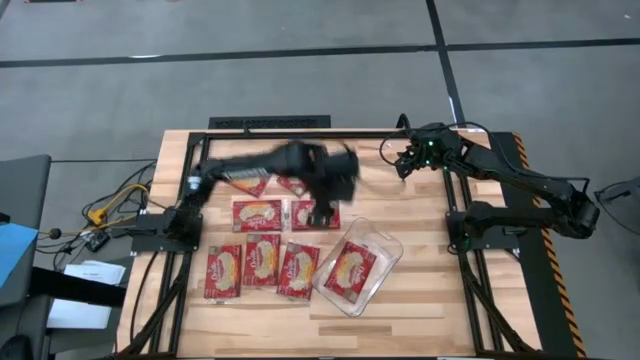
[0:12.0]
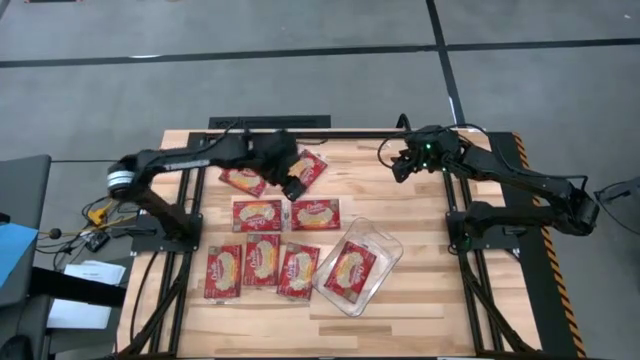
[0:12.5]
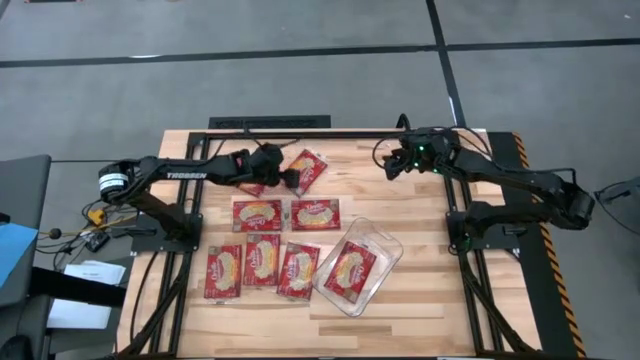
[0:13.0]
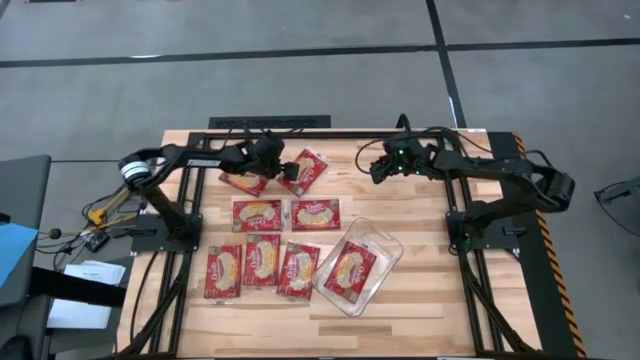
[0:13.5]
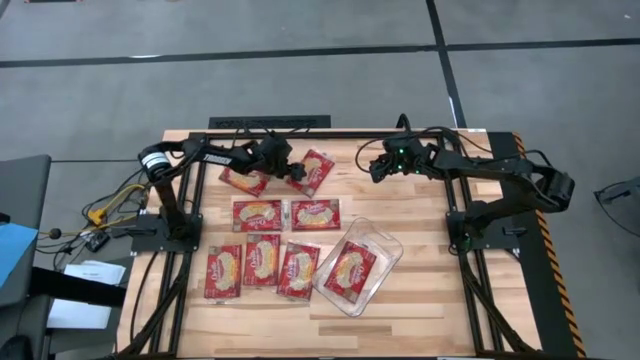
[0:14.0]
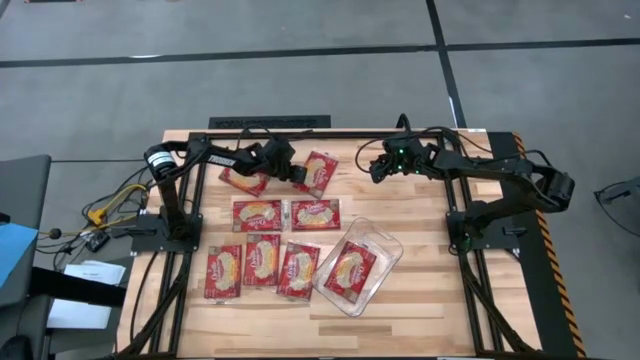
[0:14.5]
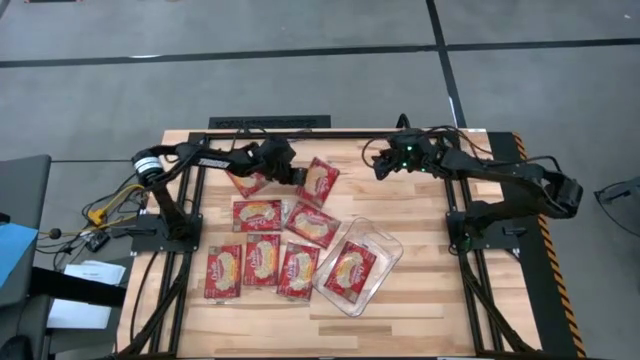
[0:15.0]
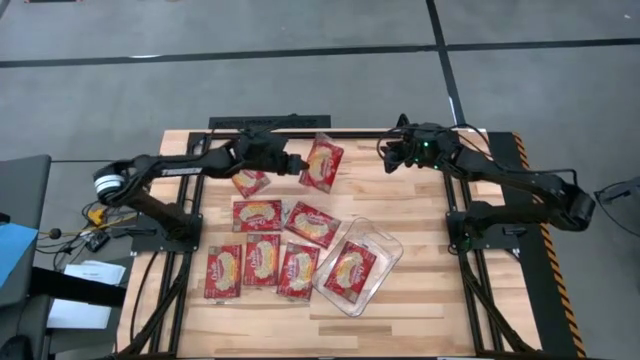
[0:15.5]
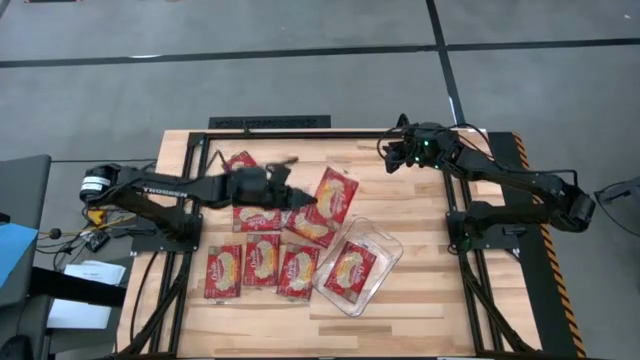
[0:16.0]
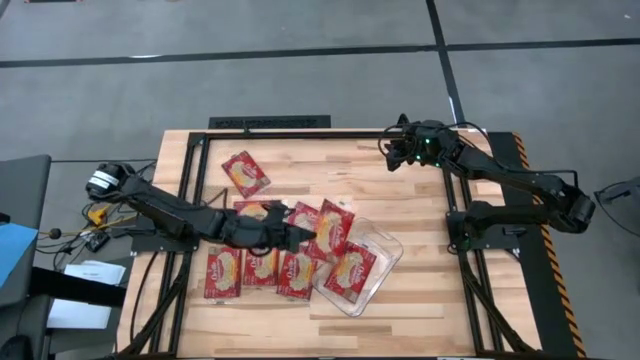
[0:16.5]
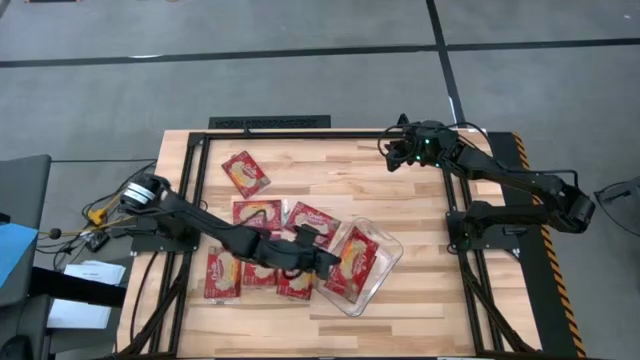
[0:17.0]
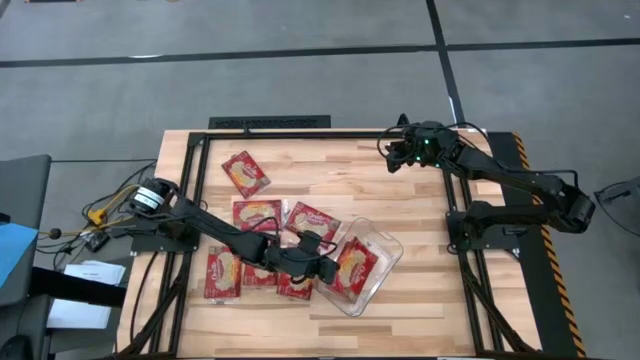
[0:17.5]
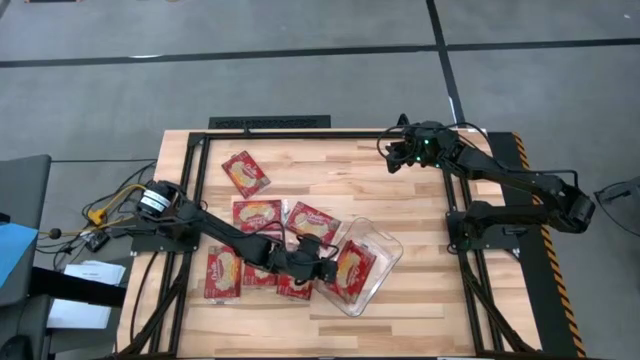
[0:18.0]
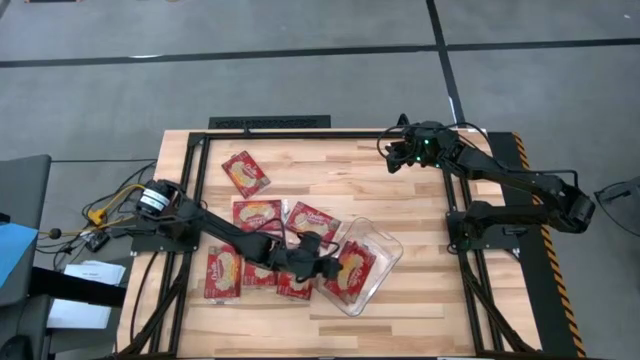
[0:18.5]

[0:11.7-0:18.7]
Task: Sort popcorn bags into baskets
Put the red popcorn packet into the transparent bin

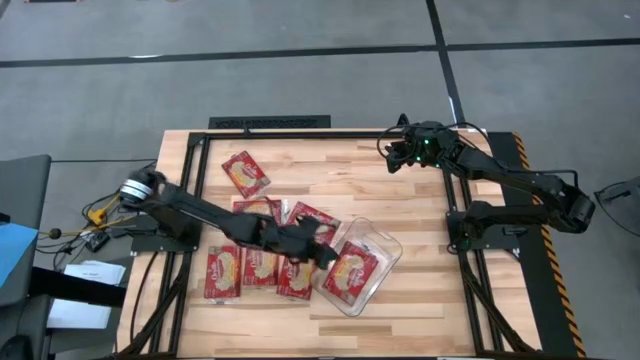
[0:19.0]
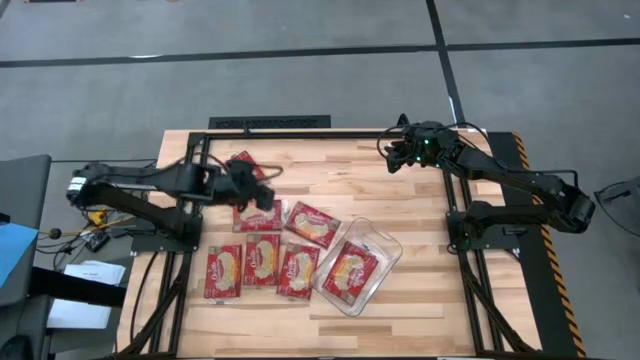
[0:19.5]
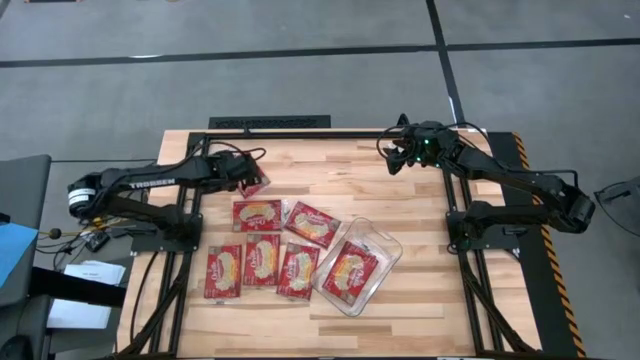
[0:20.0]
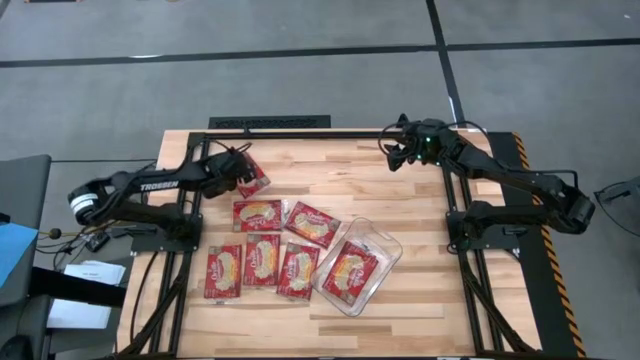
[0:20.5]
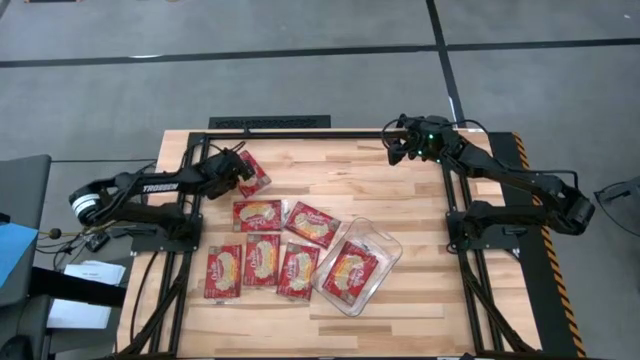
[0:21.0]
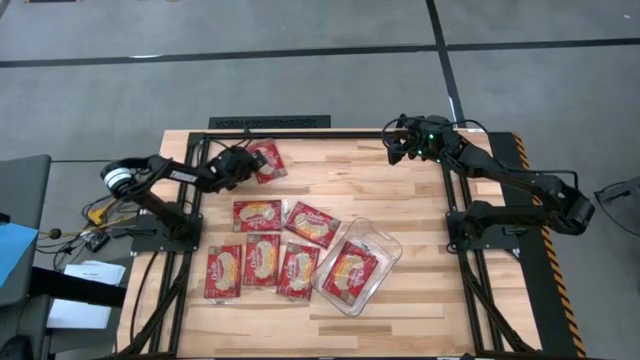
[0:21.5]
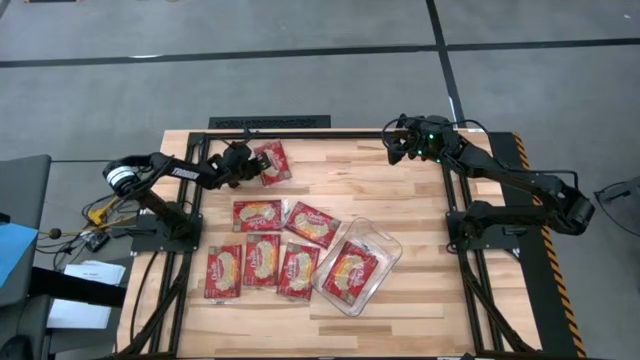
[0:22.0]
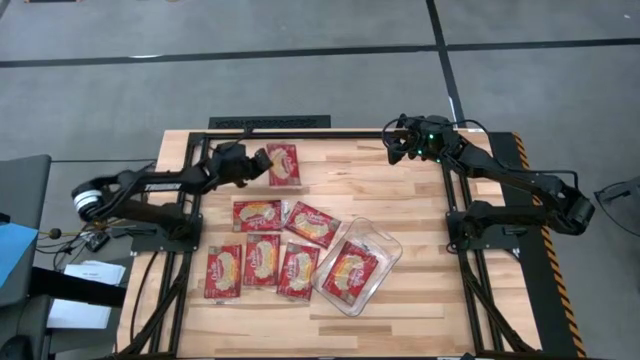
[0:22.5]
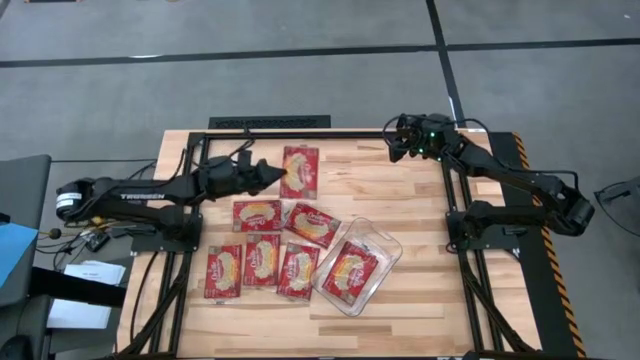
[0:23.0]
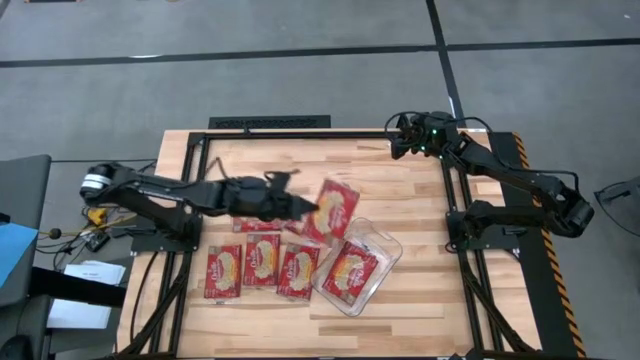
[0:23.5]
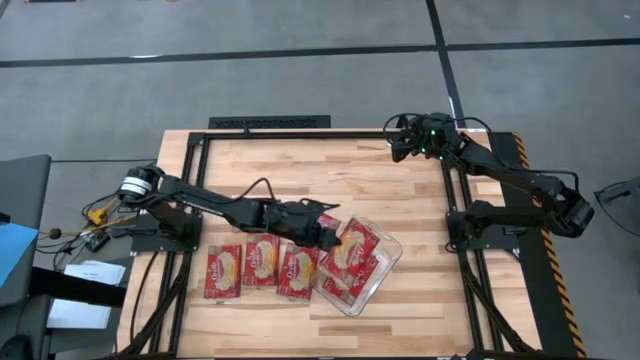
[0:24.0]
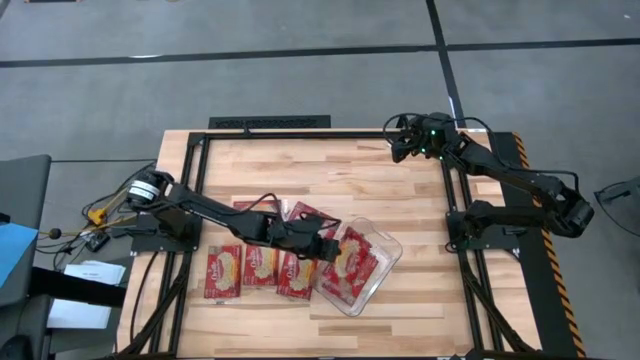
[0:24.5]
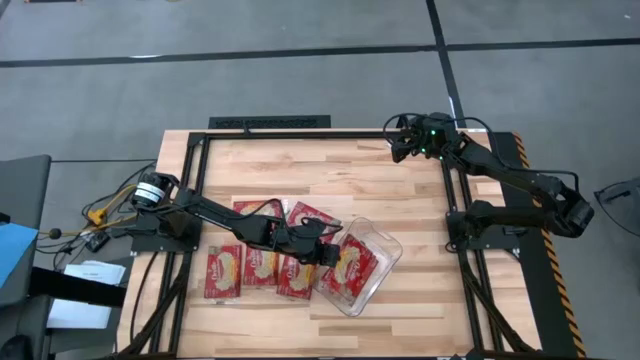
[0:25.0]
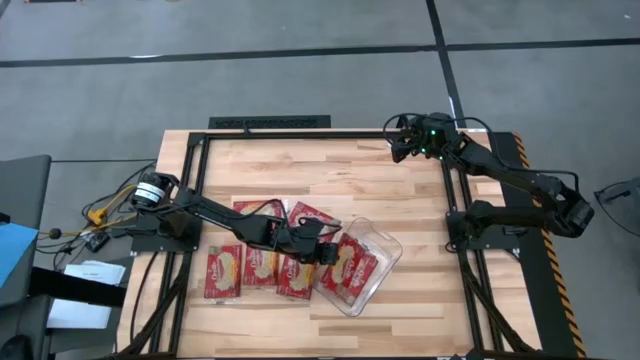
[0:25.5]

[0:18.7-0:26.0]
Put the red popcorn packet into the transparent bin

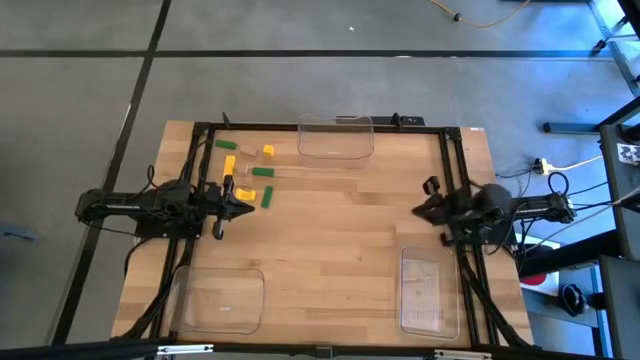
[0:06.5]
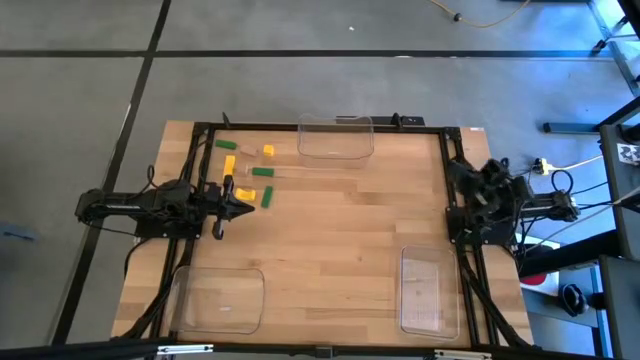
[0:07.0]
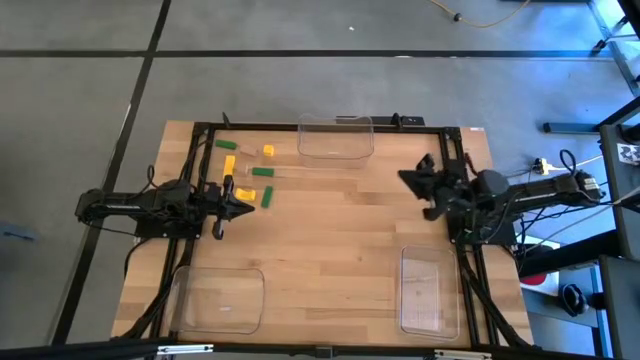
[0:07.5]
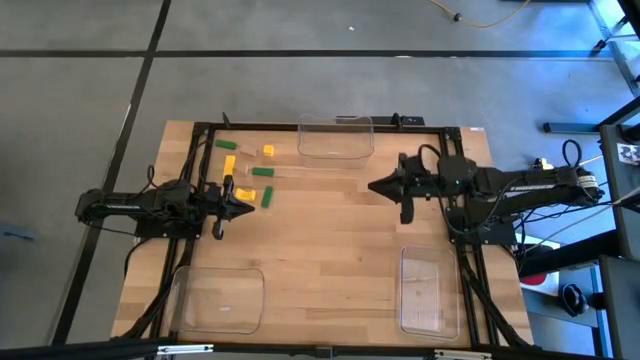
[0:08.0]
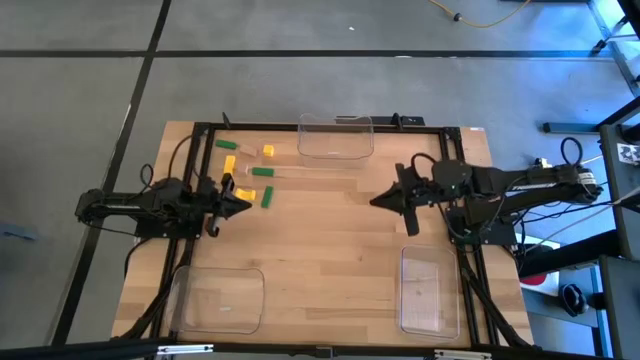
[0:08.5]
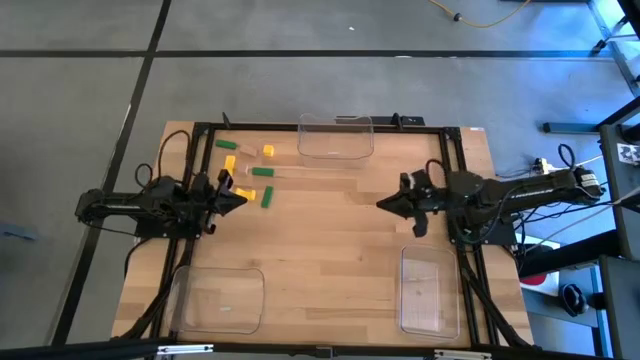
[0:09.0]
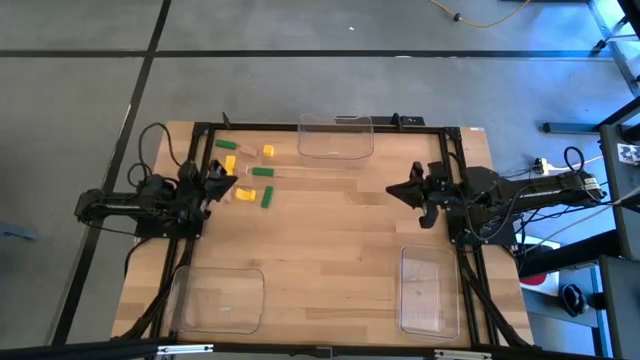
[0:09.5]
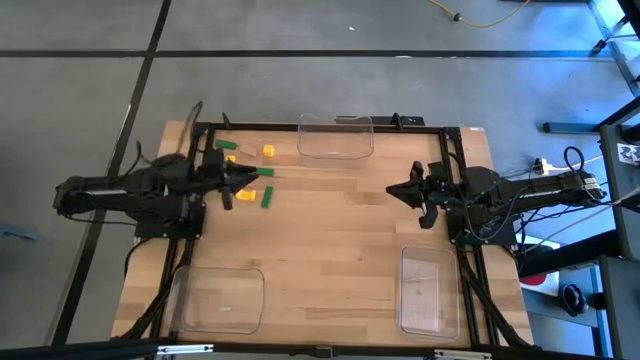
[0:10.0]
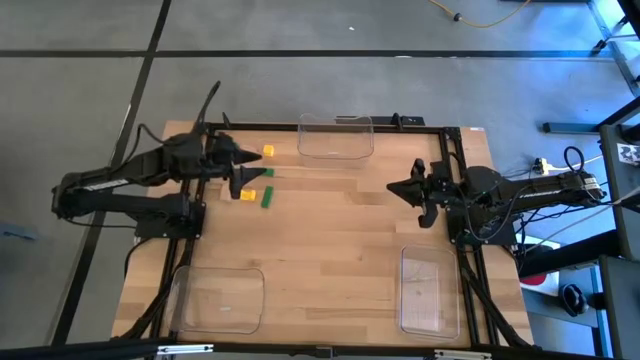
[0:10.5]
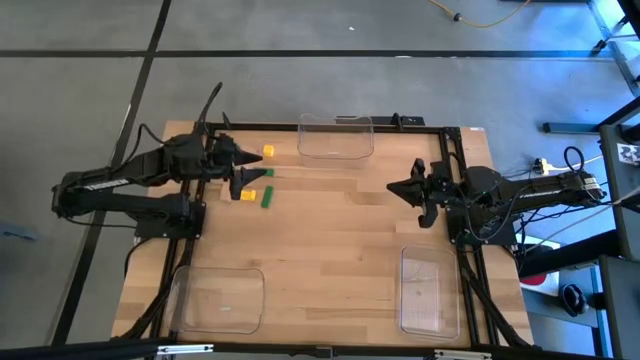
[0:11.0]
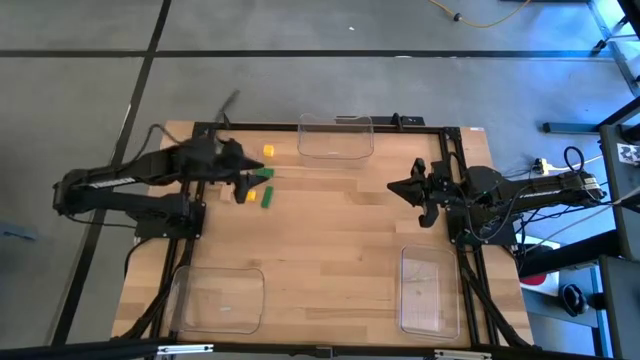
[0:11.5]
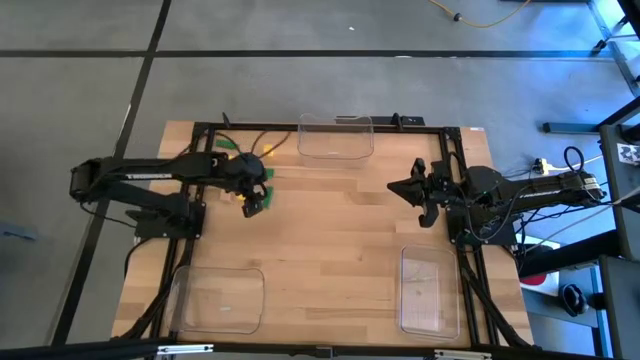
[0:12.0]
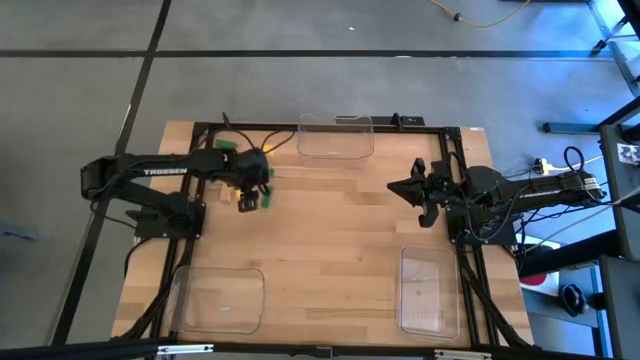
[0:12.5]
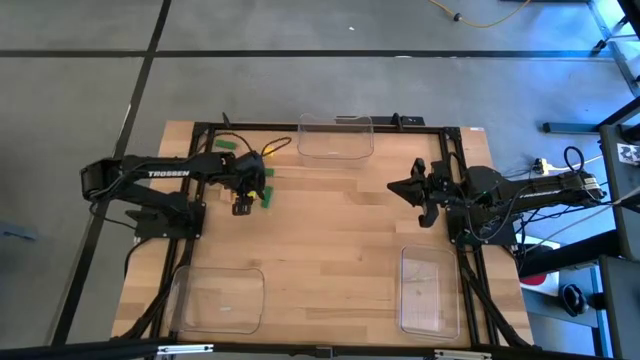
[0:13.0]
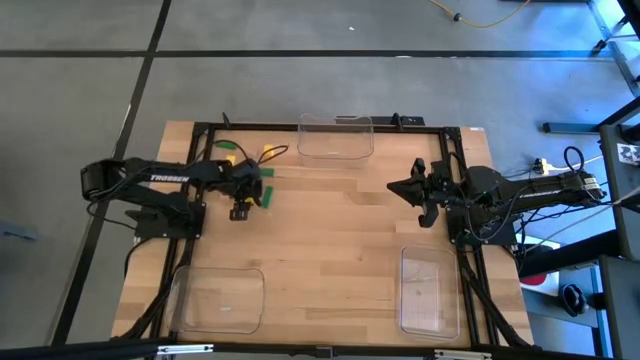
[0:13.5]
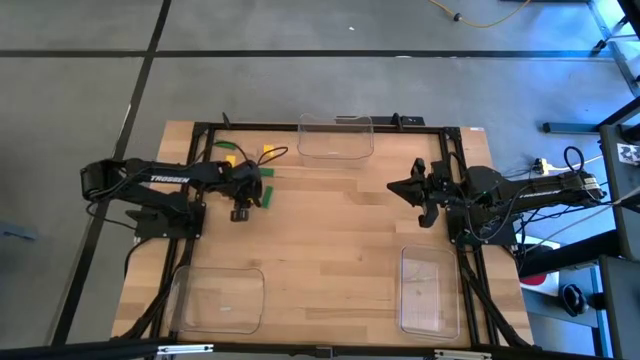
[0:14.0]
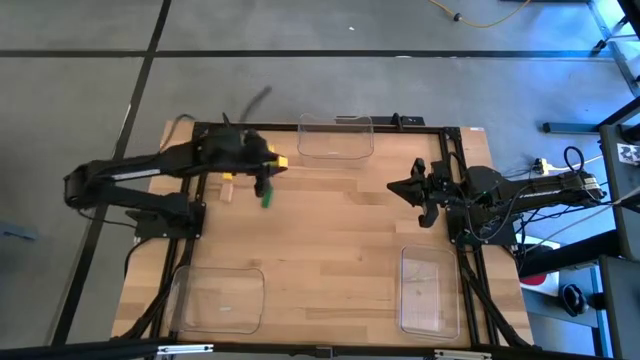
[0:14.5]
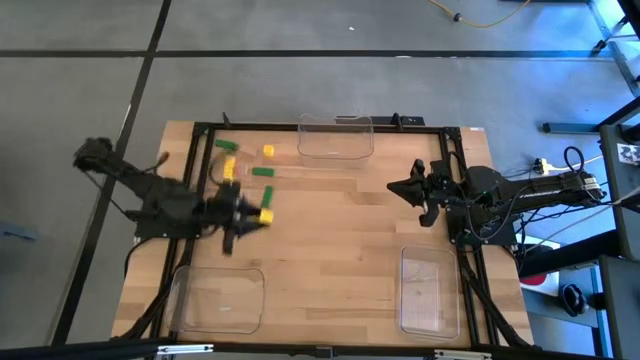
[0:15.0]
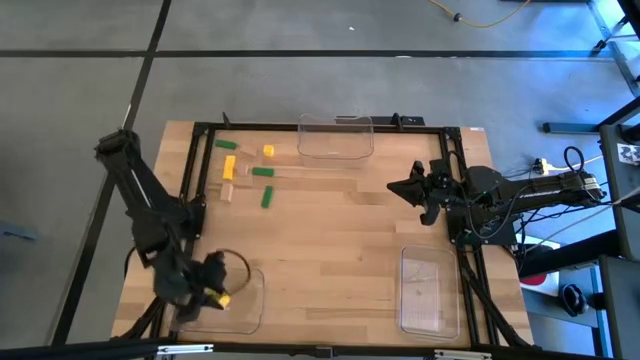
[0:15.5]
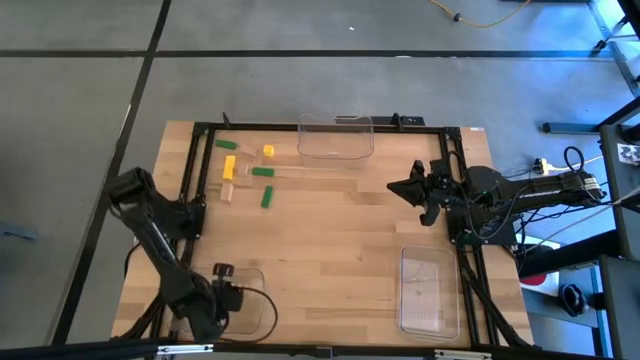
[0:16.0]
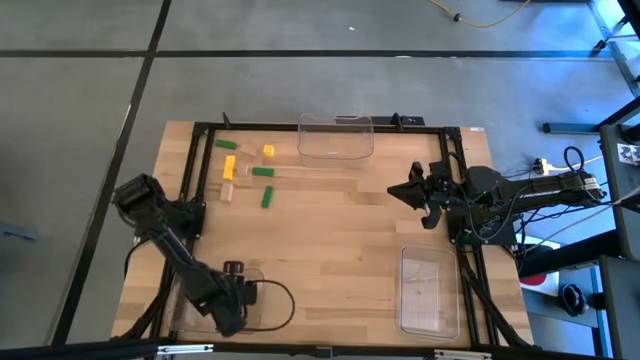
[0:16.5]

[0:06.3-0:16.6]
Task: Sort & place blocks by color
Put the bottom yellow block into the bottom left transparent bin
